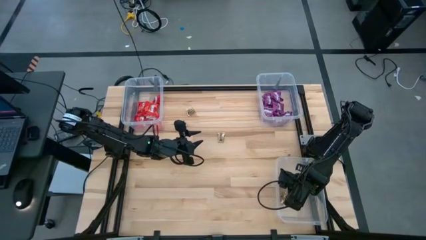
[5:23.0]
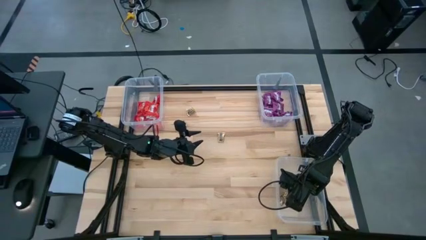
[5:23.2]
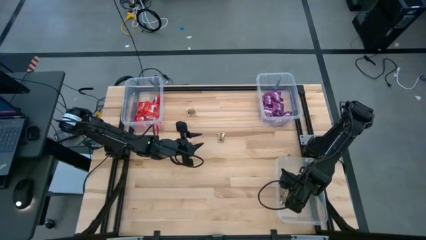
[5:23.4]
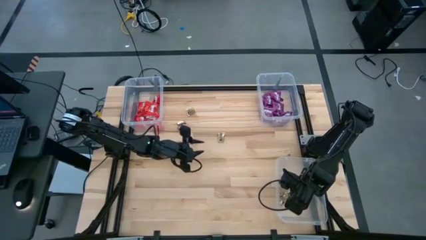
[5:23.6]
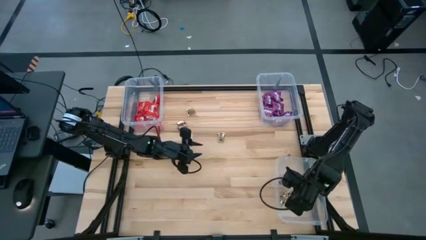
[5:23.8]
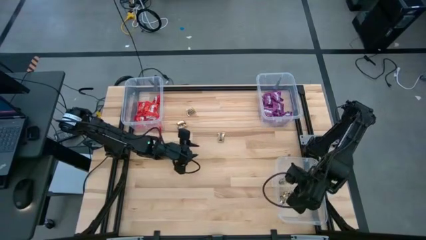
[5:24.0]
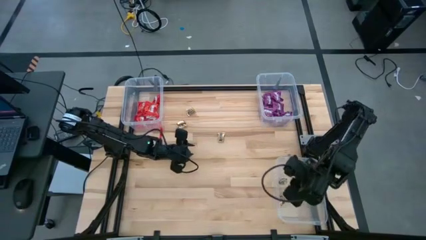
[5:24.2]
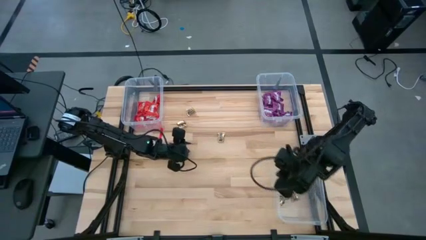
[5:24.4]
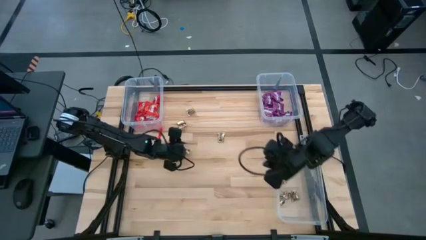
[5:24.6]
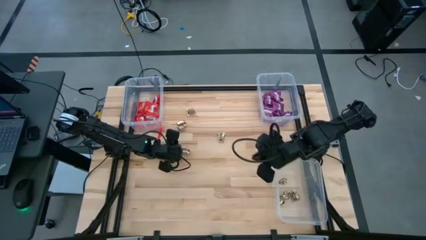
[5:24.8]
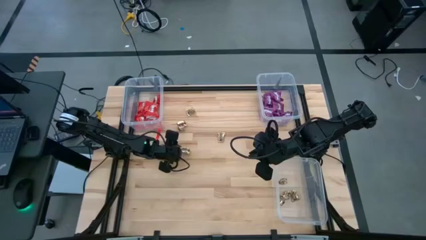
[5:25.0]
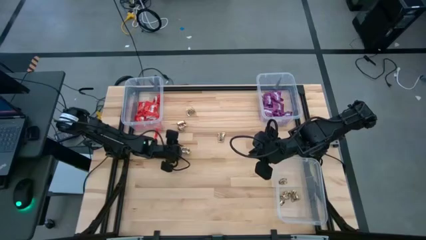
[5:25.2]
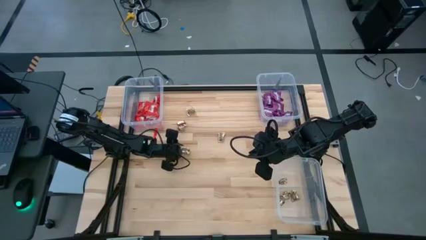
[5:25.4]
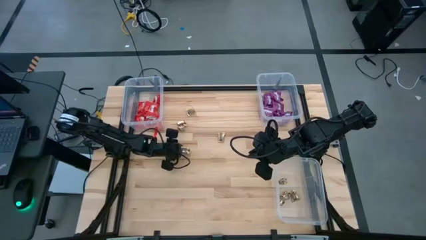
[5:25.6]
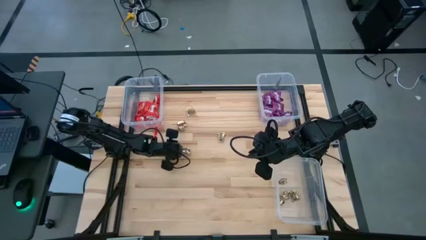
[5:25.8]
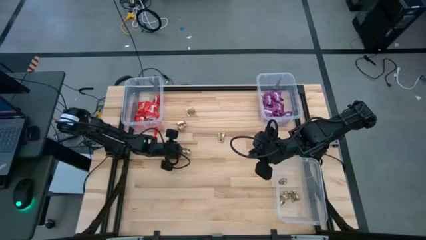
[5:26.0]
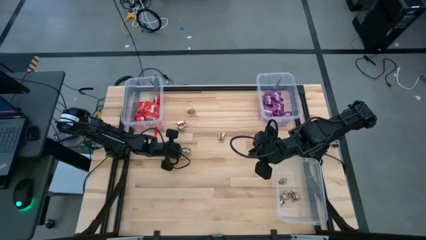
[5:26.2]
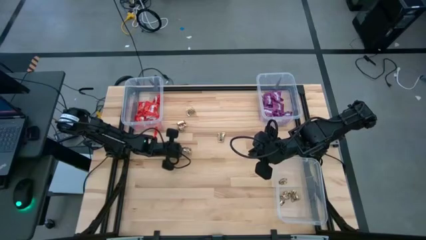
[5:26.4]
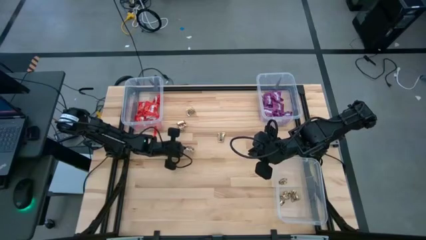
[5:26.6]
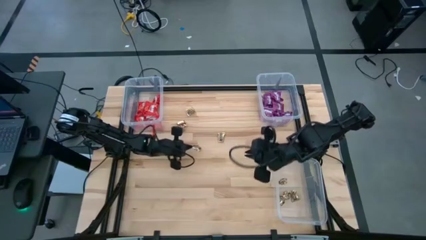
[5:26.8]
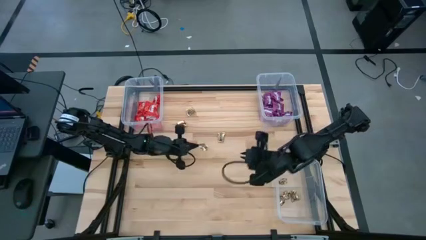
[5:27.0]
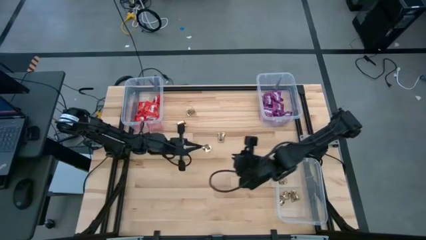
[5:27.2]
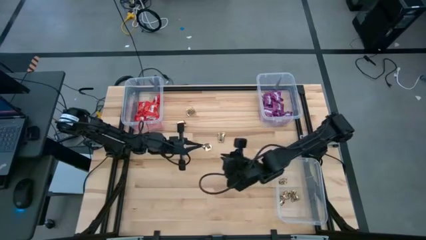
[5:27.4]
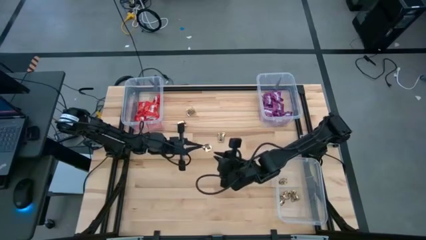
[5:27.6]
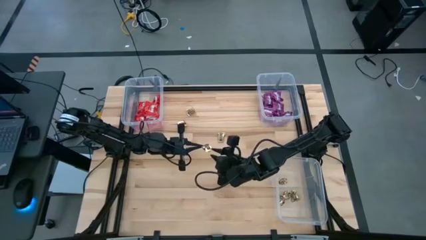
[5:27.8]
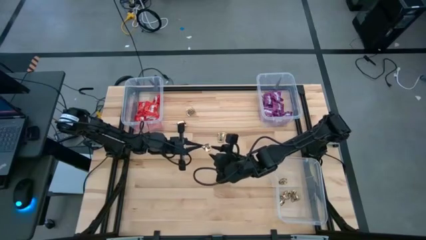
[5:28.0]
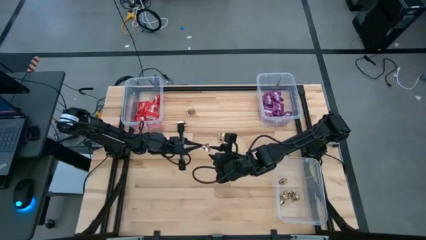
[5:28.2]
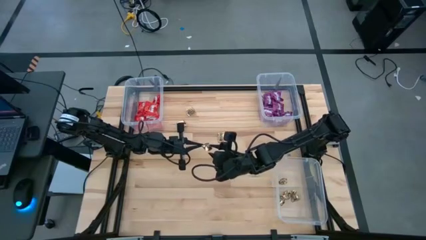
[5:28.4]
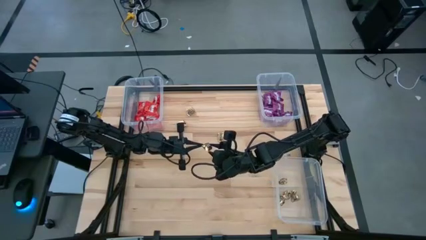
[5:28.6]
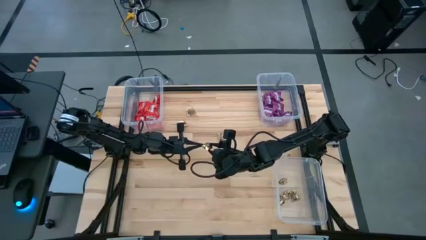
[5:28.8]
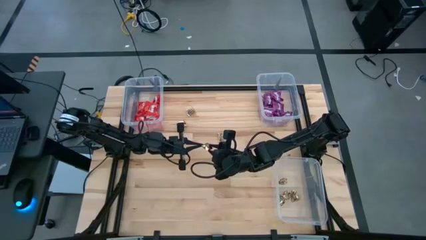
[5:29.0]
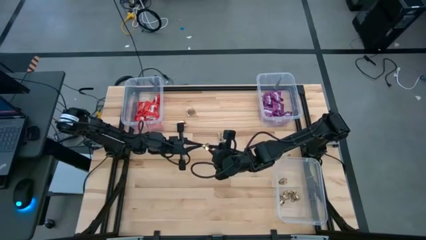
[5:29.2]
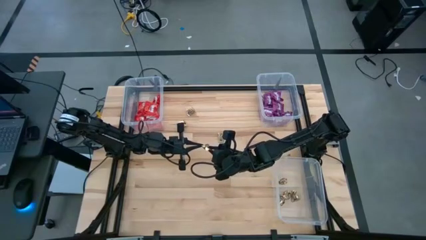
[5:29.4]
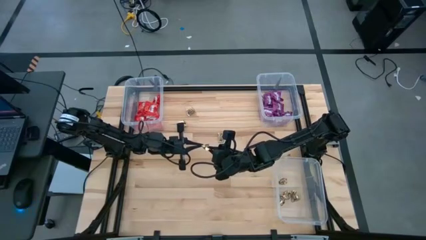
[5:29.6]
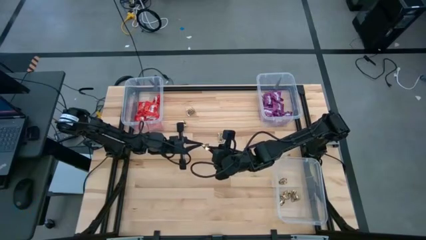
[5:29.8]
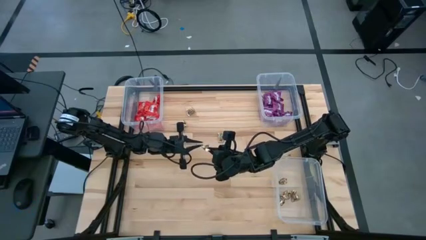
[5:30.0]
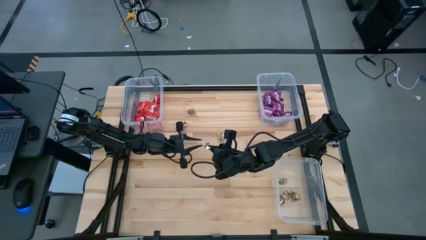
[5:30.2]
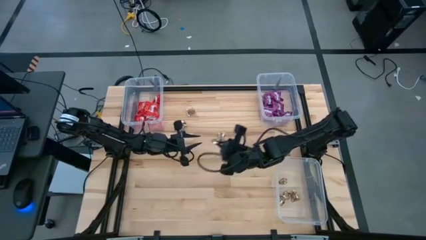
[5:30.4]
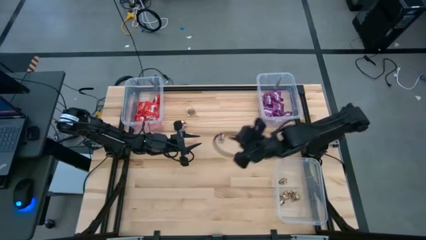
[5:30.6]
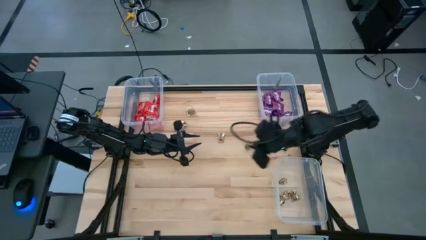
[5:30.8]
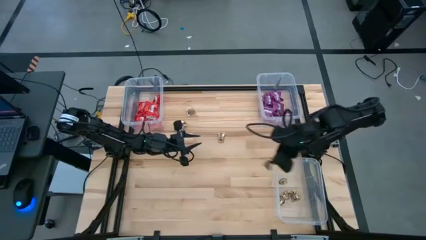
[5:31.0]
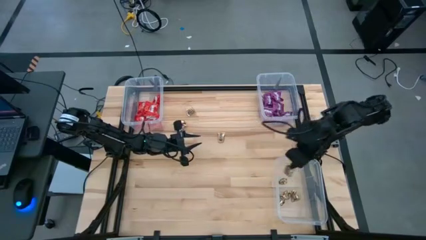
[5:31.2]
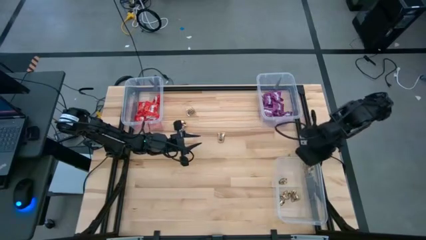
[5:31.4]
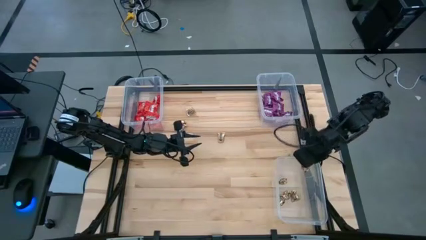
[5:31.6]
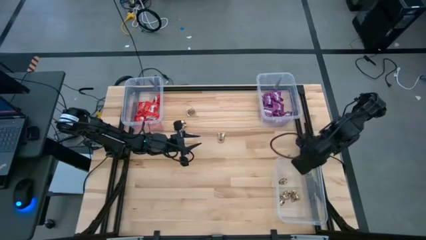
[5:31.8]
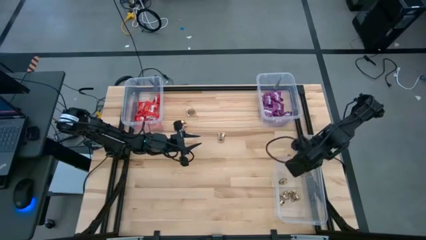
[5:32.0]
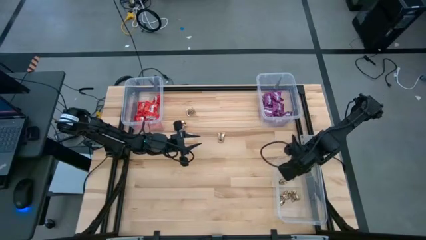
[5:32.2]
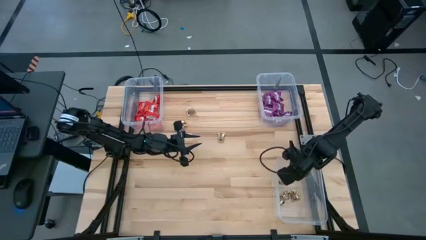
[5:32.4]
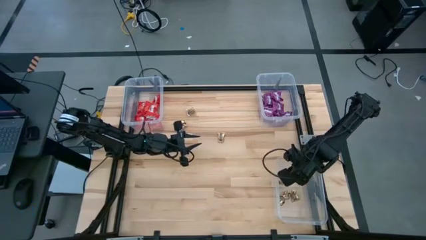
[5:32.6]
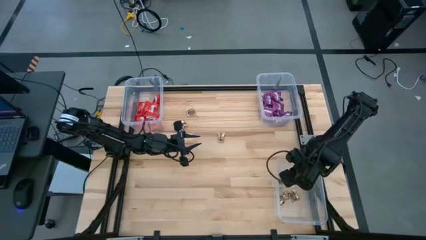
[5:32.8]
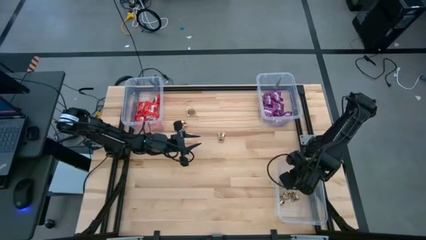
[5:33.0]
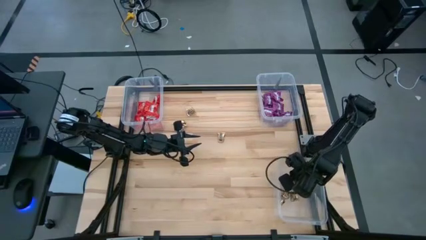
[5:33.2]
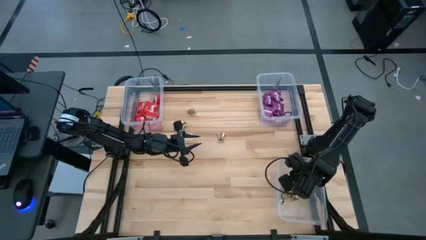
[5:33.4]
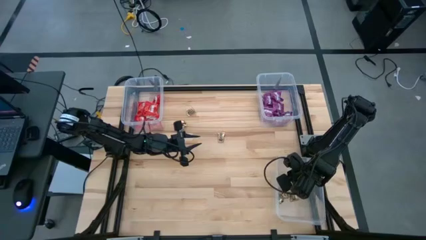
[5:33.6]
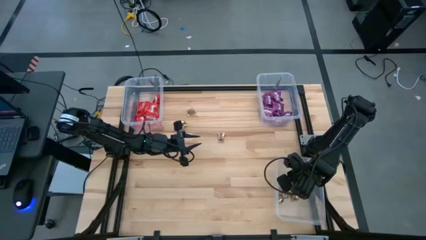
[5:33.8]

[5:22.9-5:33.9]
Task: Sort candy
Put the yellow candy into the bottom right transparent bin

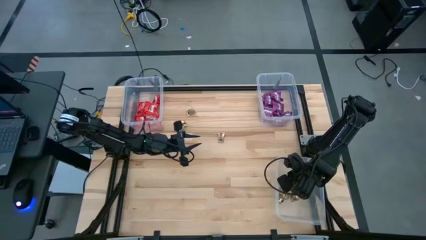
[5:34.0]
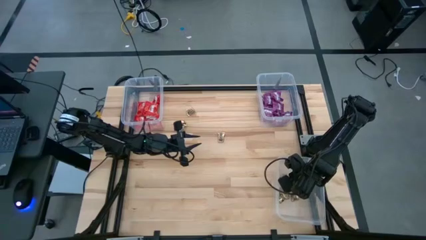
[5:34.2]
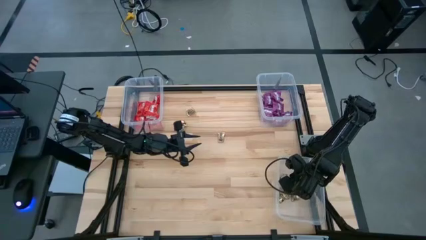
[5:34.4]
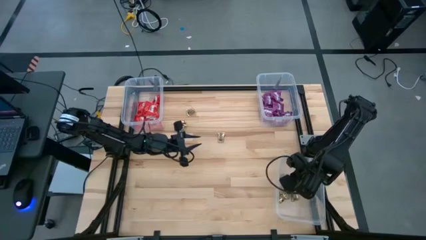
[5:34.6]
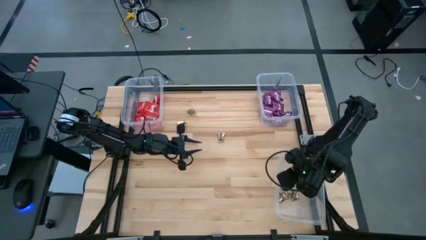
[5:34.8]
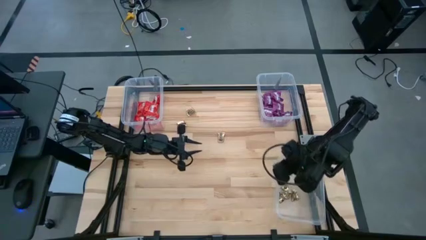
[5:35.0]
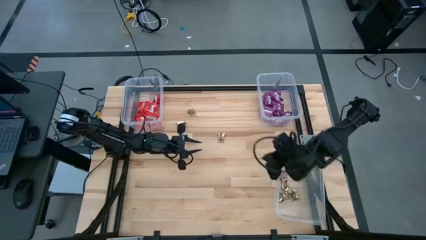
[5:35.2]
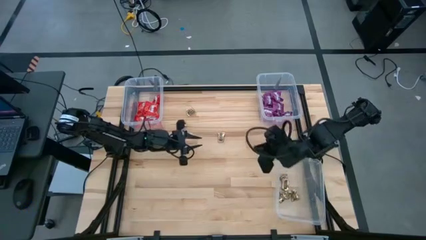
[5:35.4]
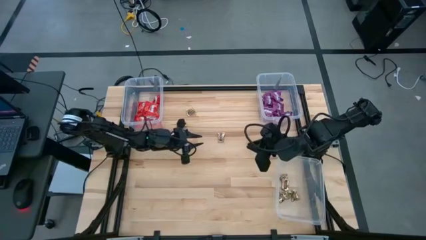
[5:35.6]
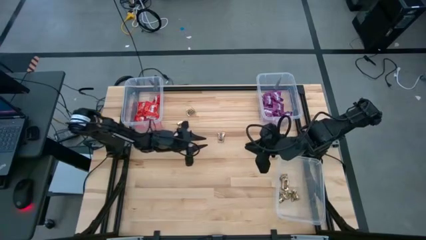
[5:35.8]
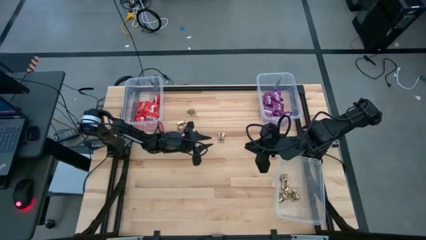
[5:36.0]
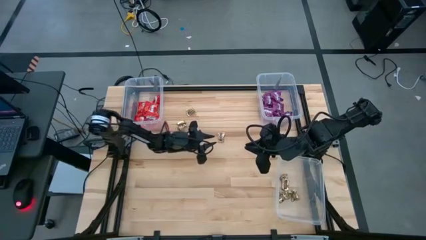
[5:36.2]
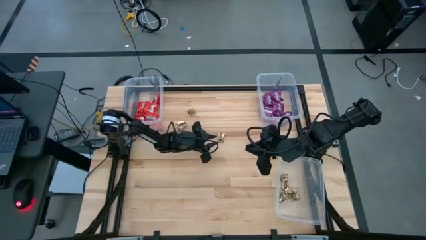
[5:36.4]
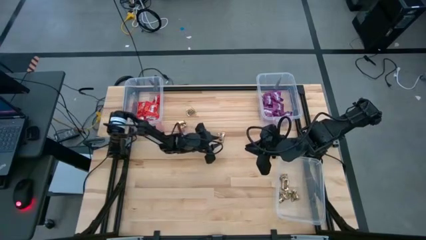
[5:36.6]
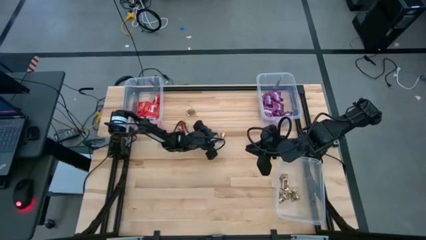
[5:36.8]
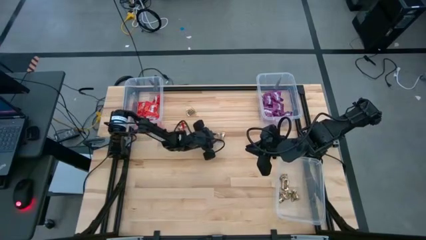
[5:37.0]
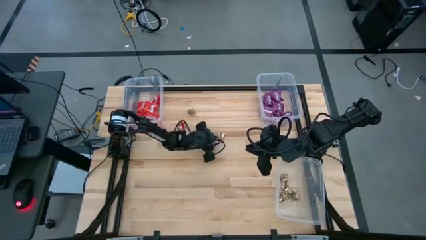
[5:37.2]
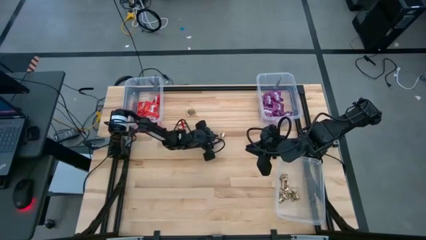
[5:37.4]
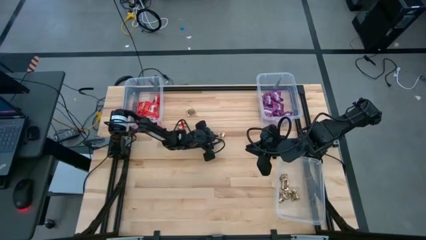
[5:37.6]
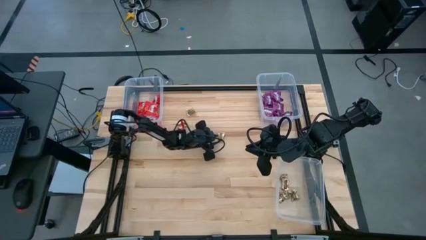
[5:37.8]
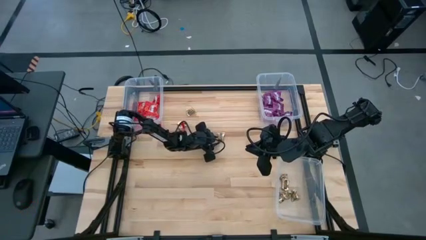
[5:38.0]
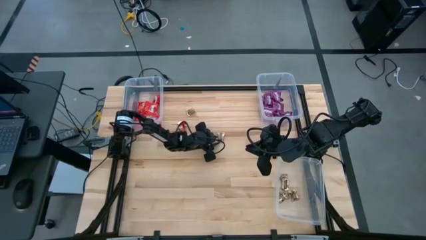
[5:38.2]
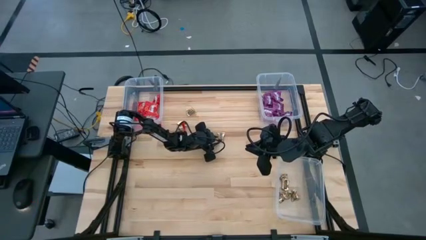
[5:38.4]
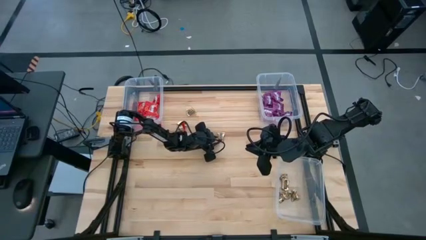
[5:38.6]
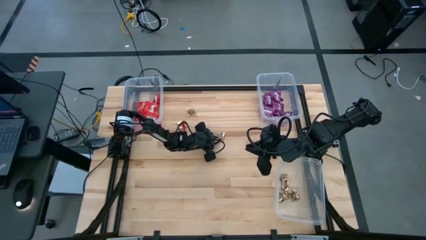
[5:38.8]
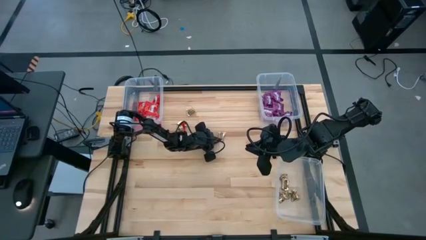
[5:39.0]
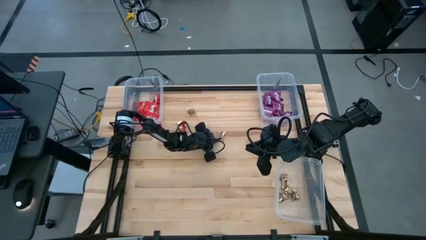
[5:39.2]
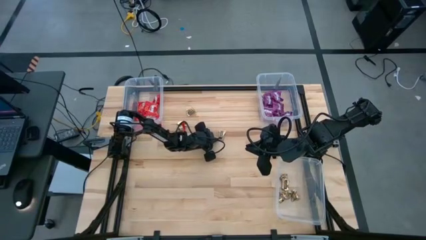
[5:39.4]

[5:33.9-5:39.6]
Put the yellow candy into the bottom right transparent bin

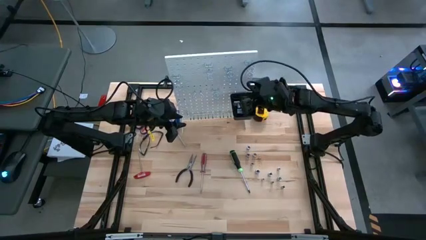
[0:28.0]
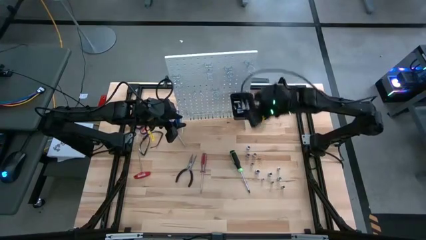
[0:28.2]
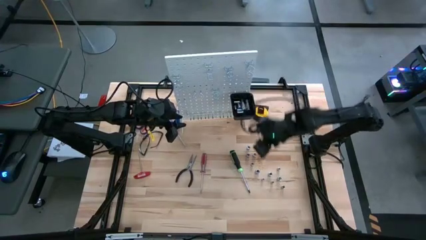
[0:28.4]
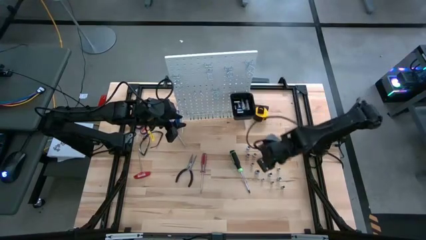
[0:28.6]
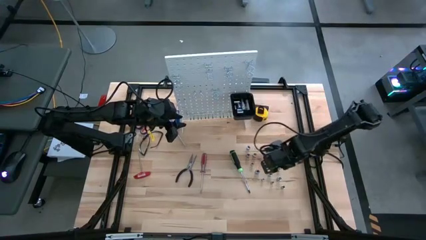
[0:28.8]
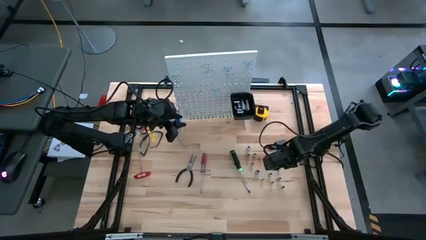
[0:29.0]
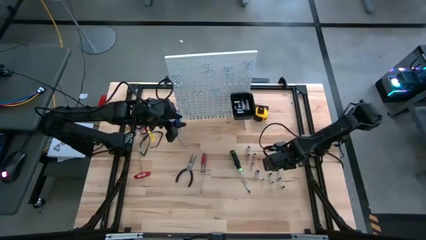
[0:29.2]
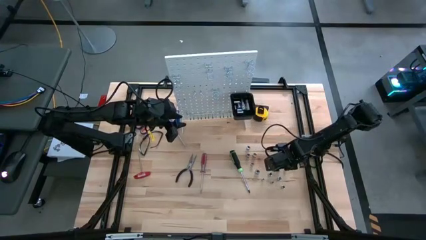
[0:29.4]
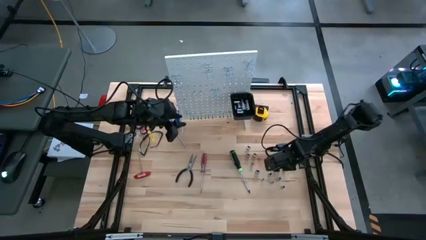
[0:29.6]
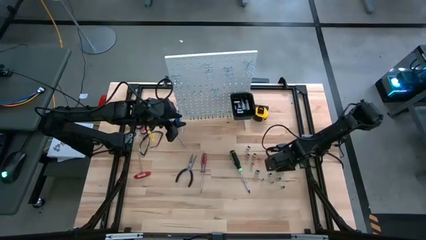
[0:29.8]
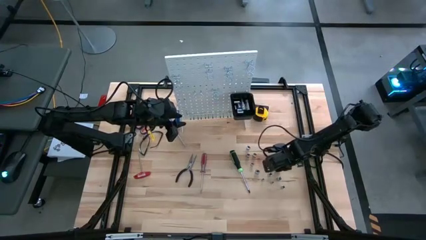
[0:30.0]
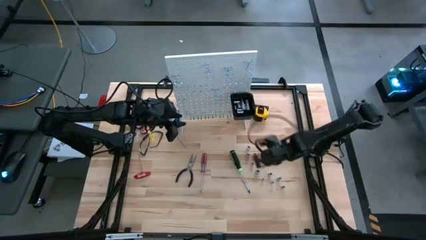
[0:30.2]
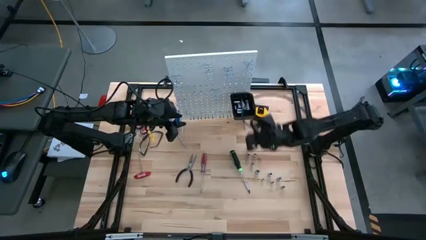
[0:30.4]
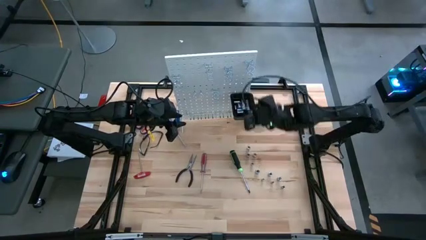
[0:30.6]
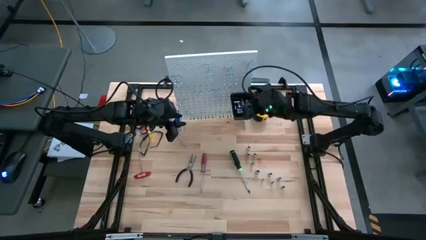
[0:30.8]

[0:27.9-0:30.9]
Task: Hang tools onto peg board
Put the silver socket into the black bin on the peg board
